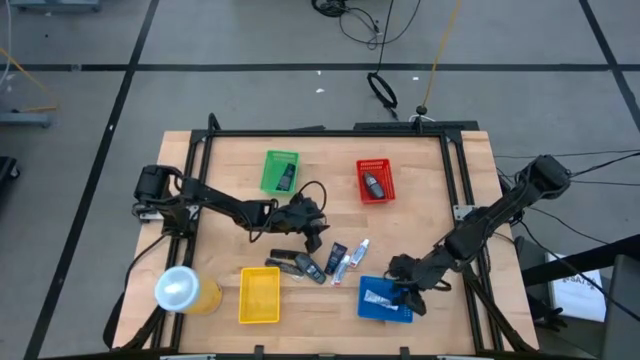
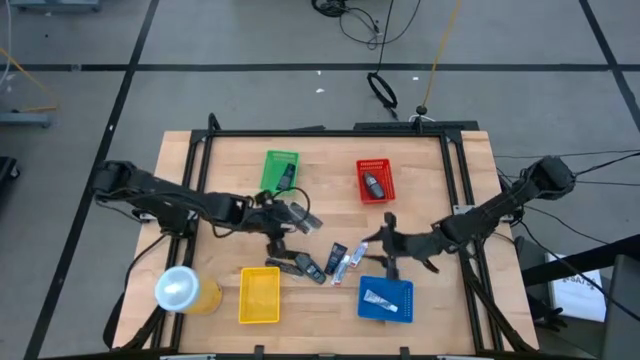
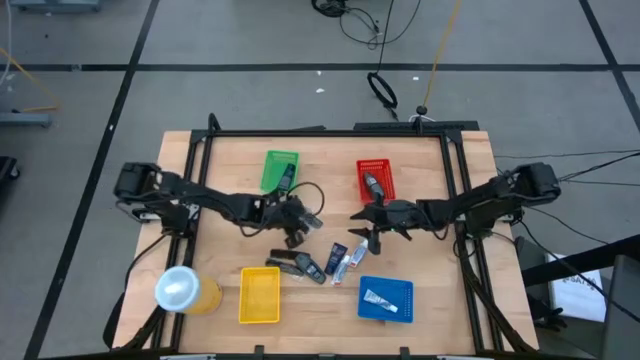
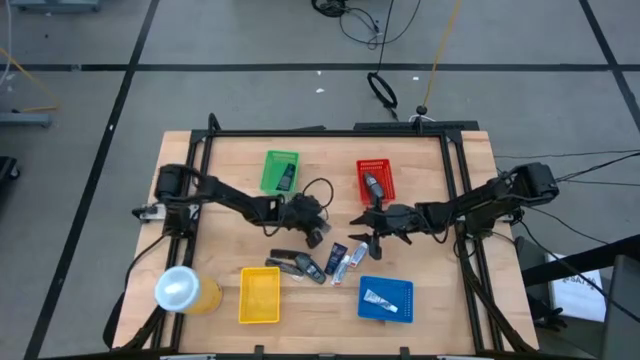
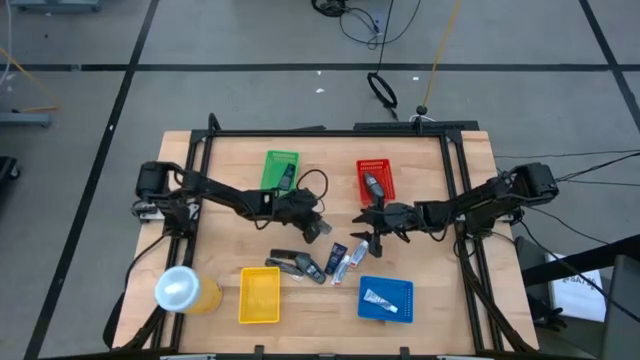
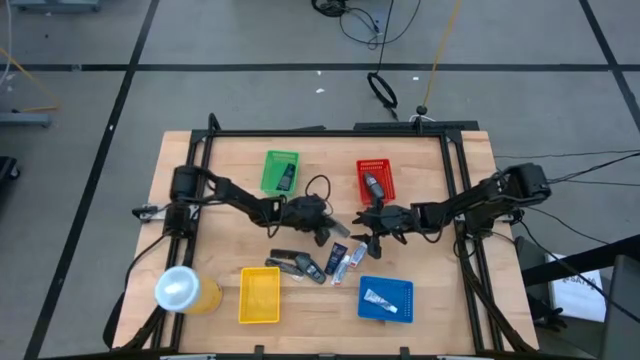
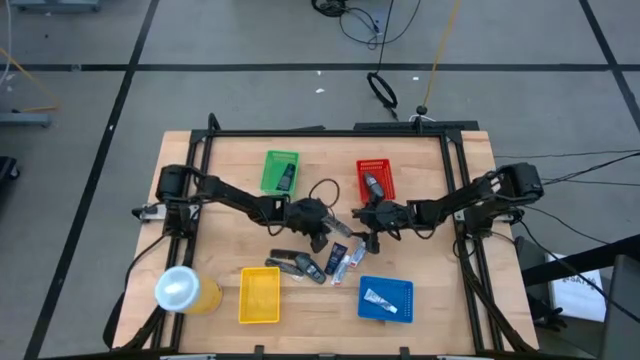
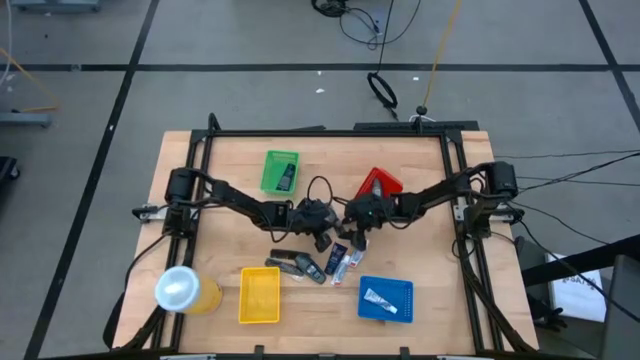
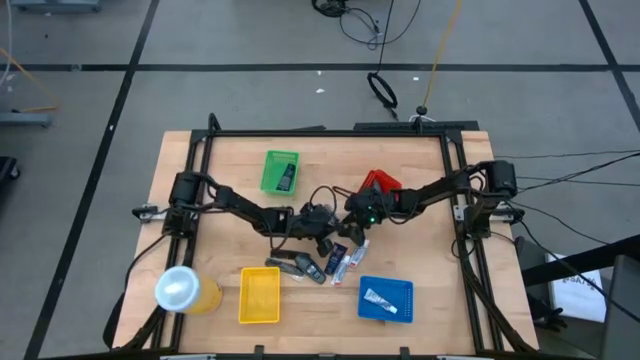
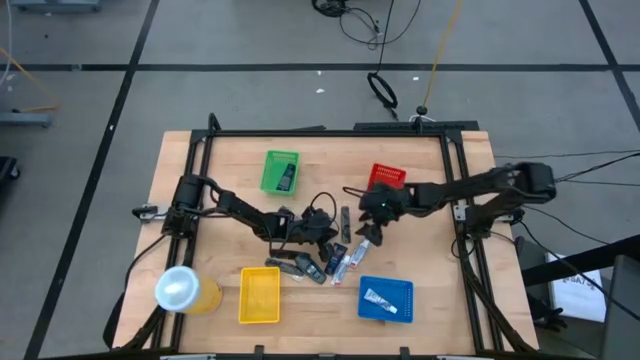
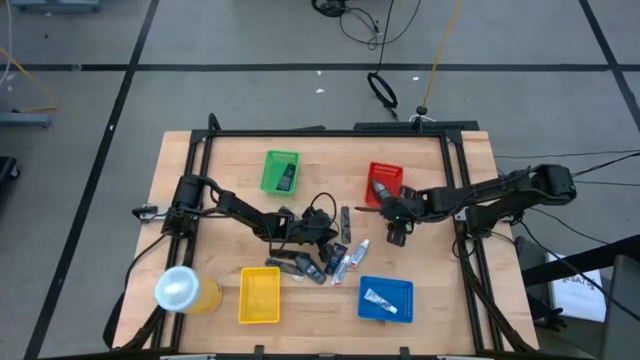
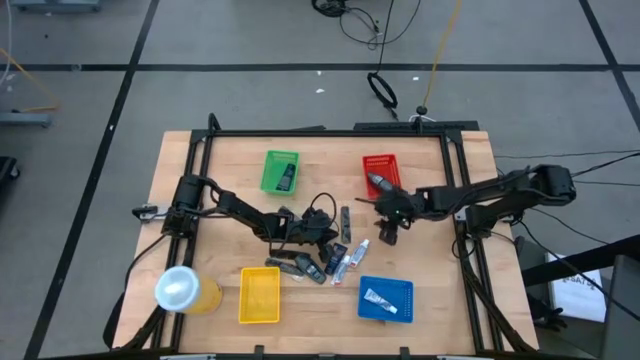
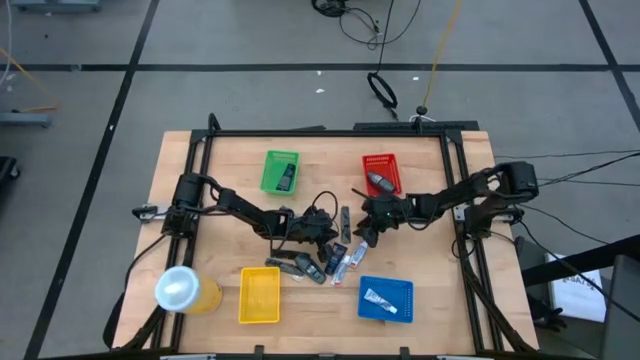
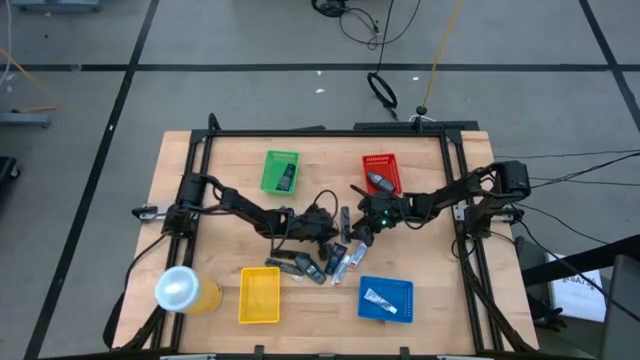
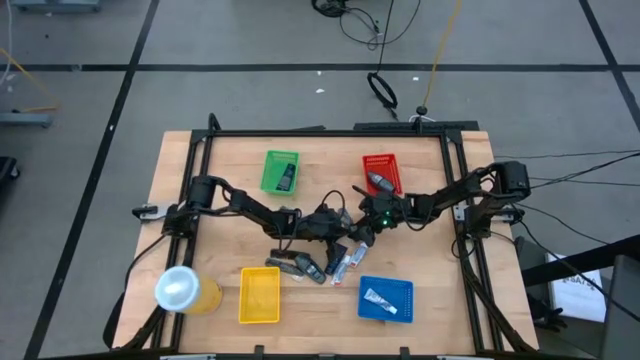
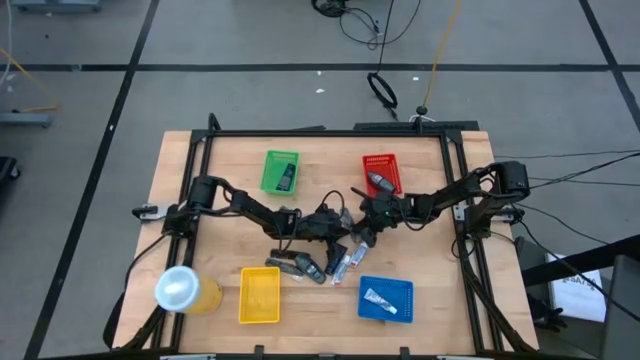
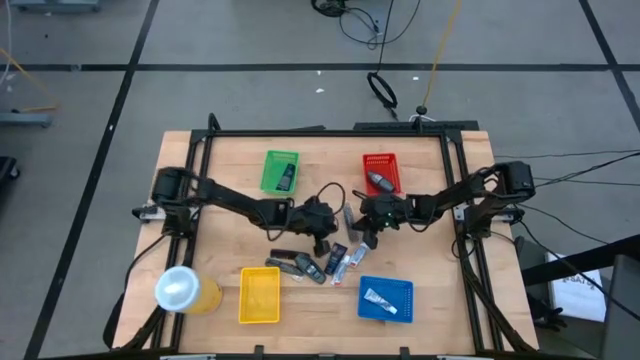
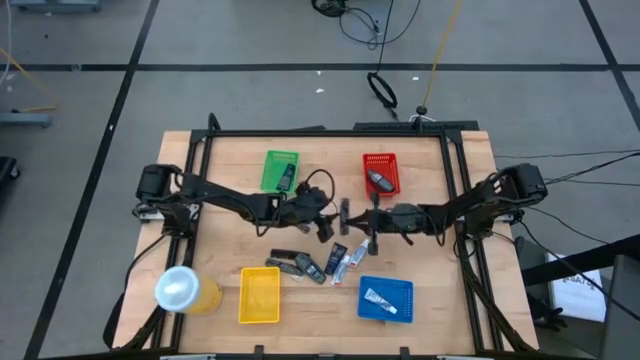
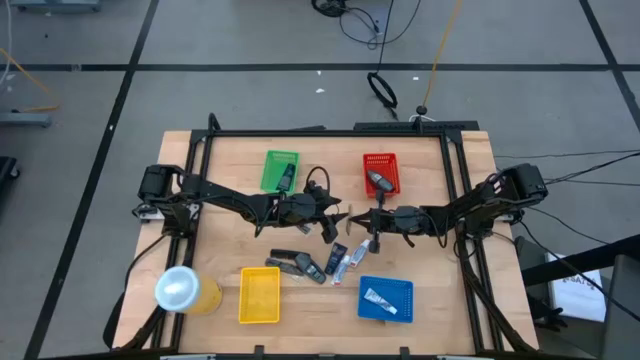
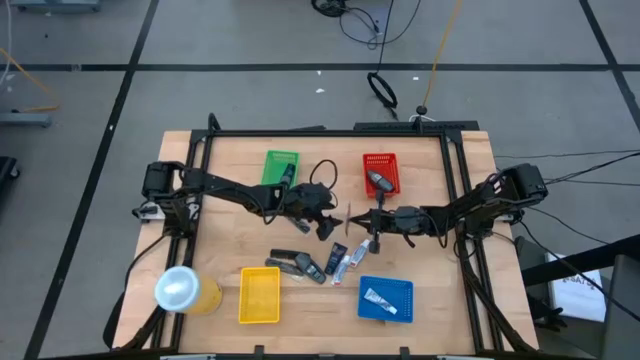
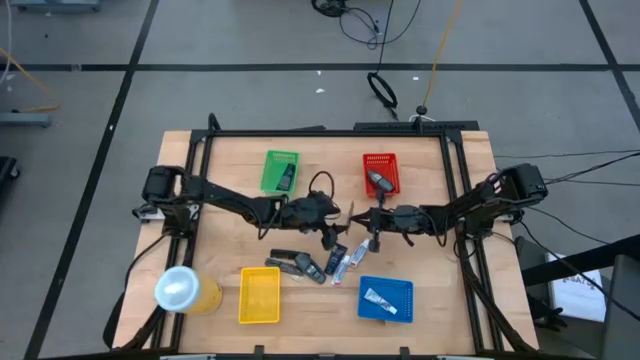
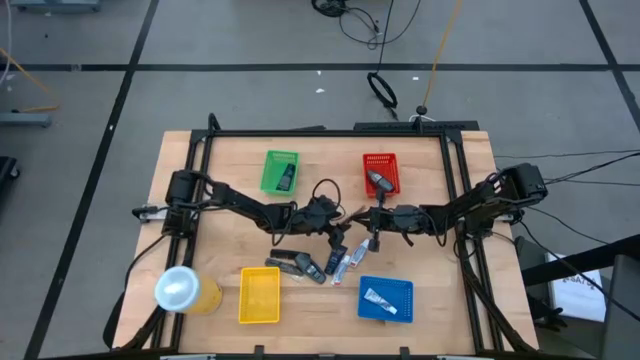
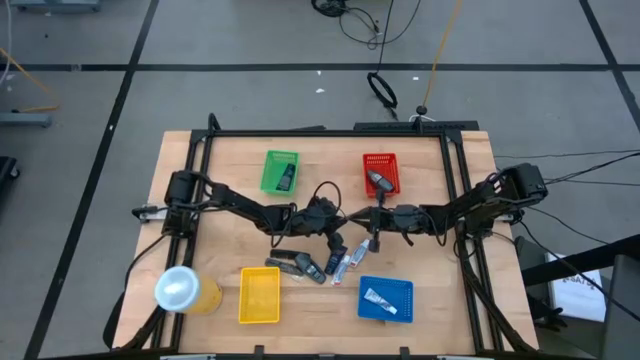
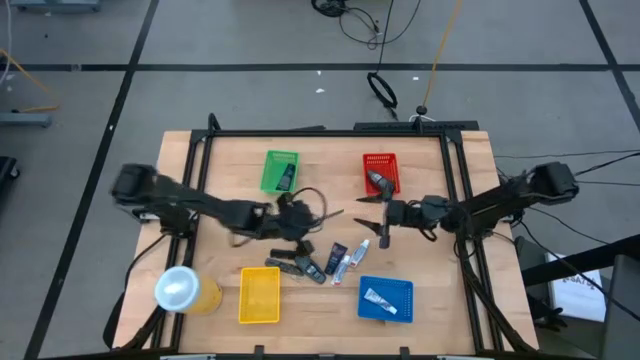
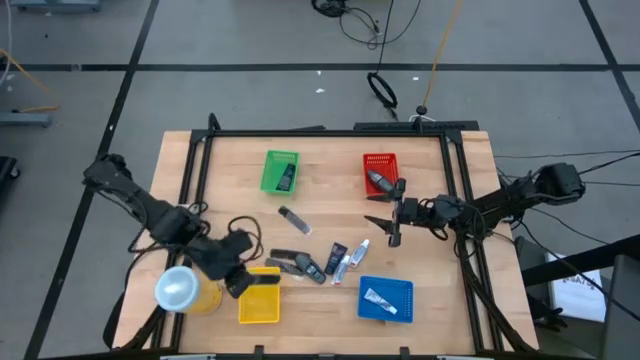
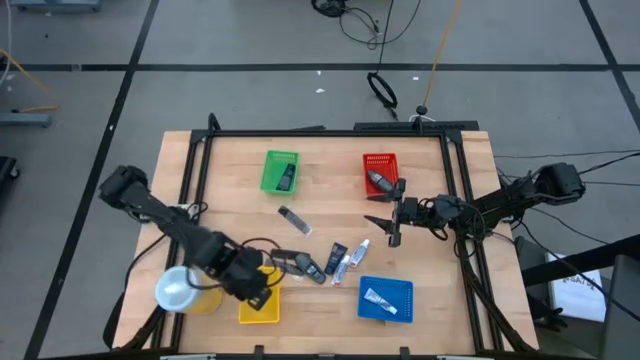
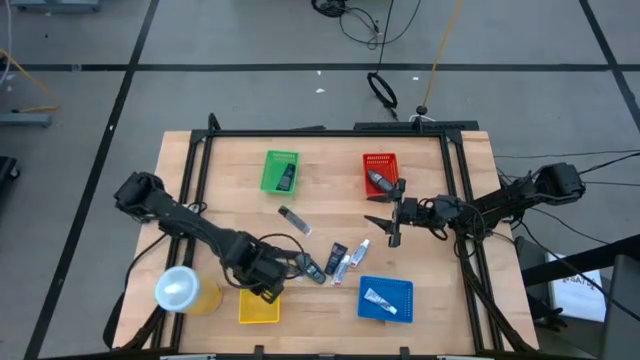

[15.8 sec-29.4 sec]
Task: Pick & Place Travel size toiletries
Put the black hairbrush into the yellow bin

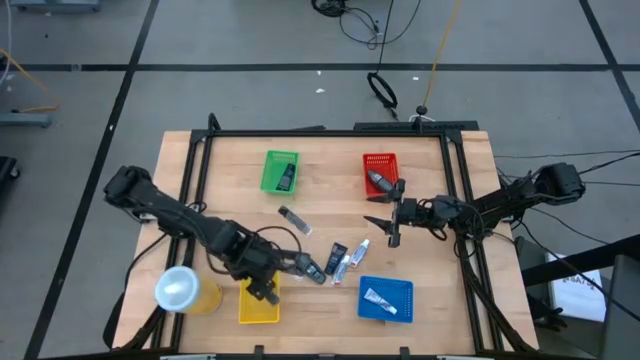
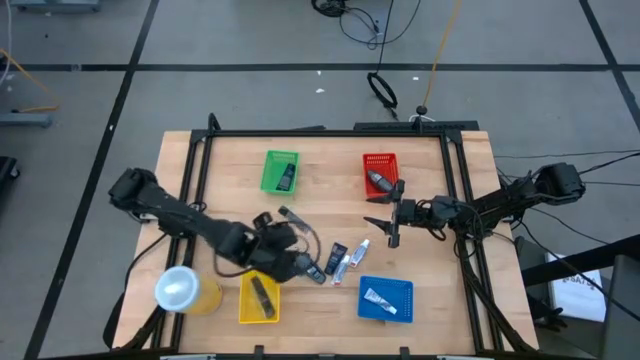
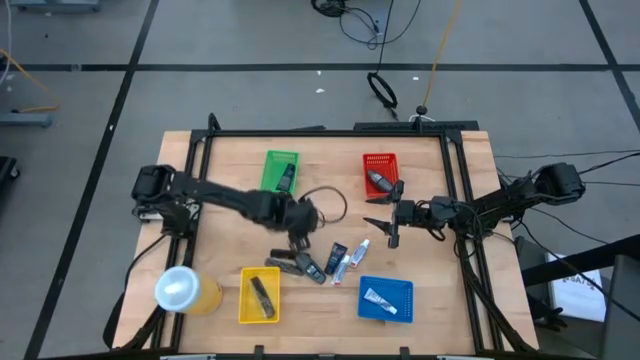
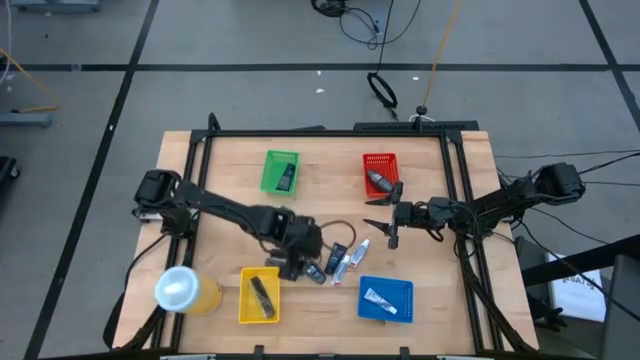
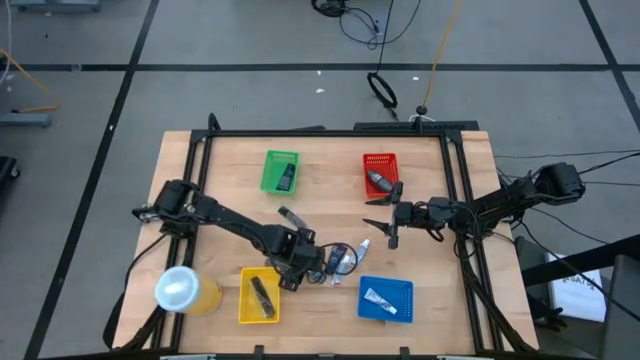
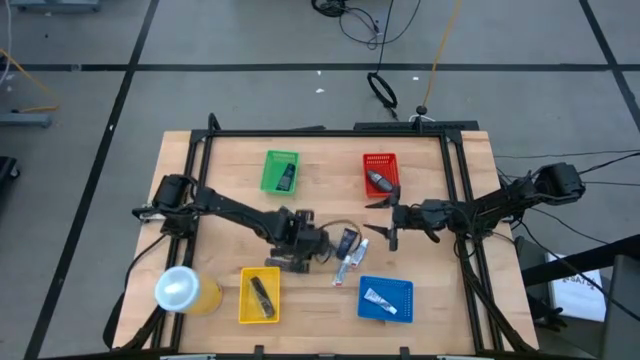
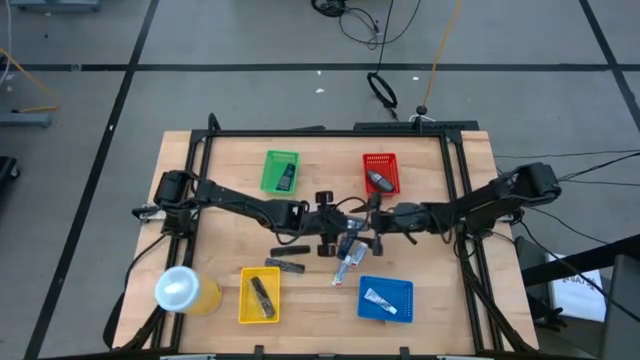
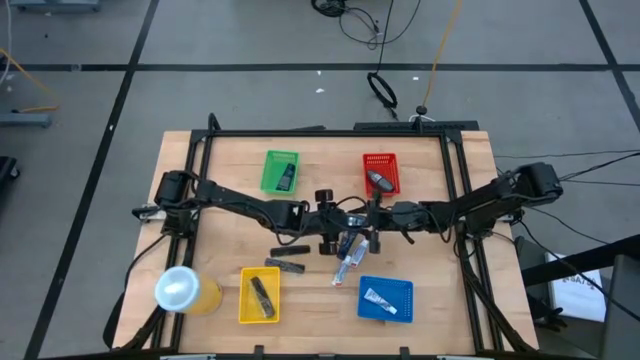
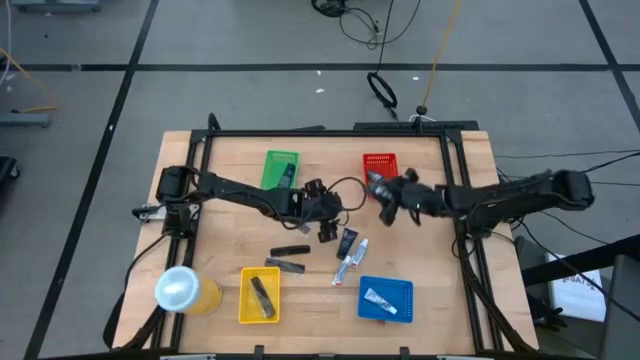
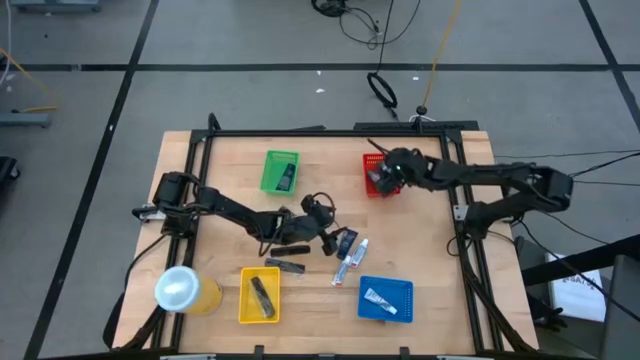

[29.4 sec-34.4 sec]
Put the black roll on deodorant into the red bin

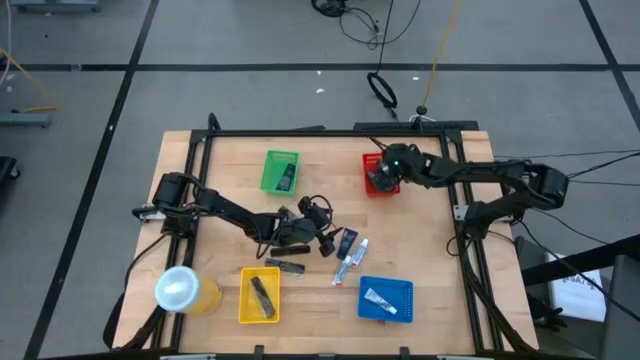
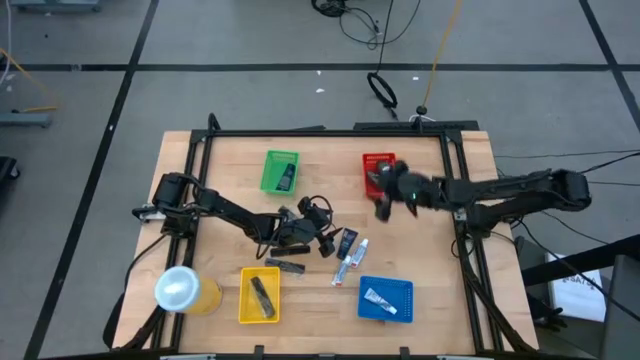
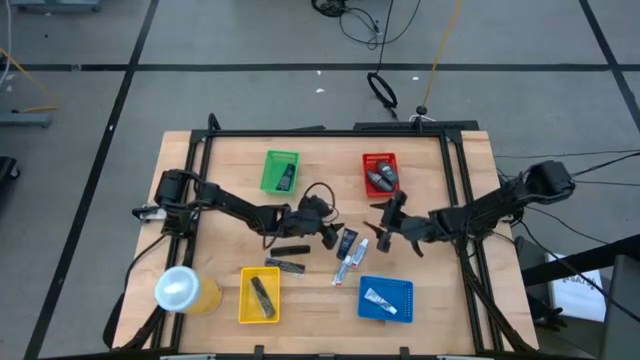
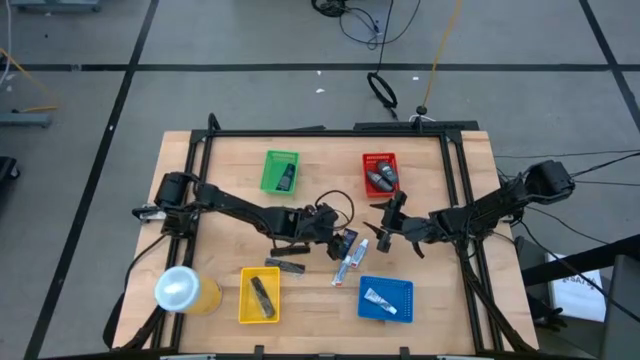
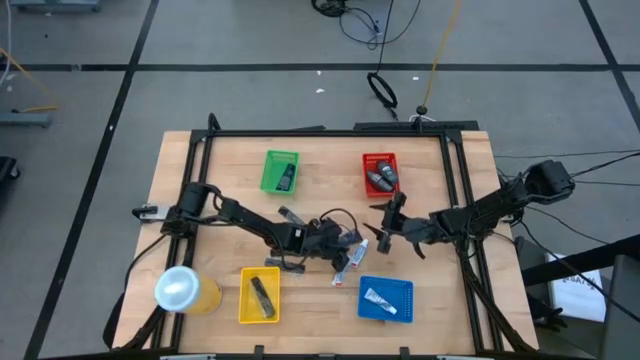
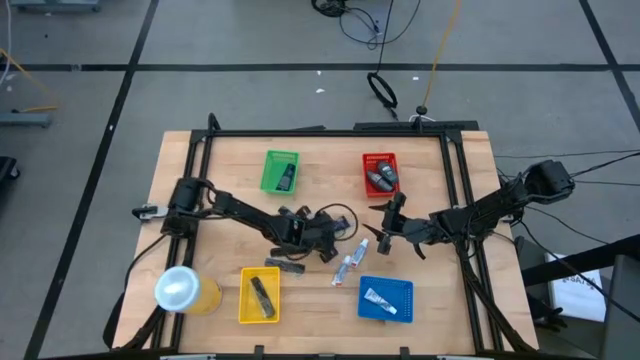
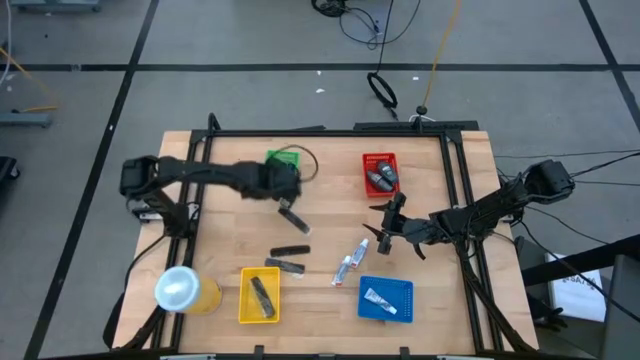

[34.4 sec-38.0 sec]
Put the blue shave cream into the green bin
